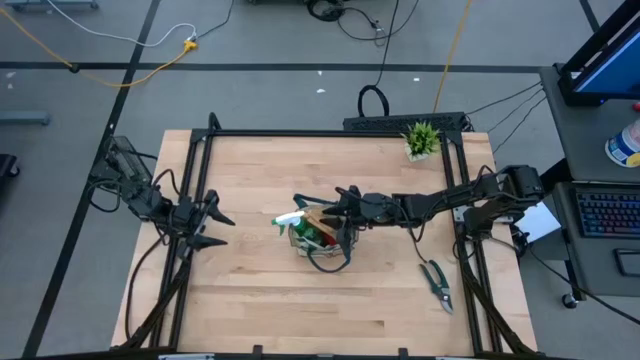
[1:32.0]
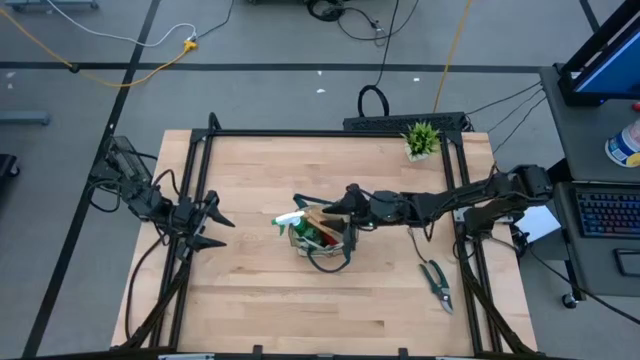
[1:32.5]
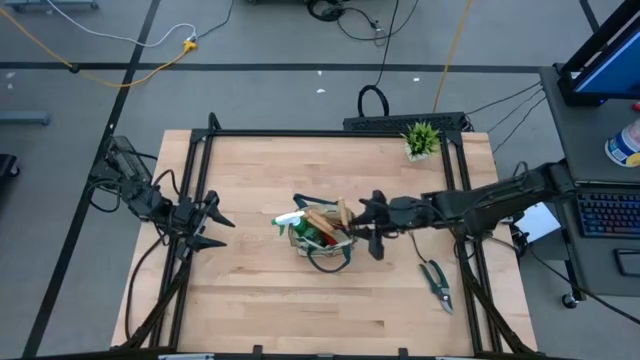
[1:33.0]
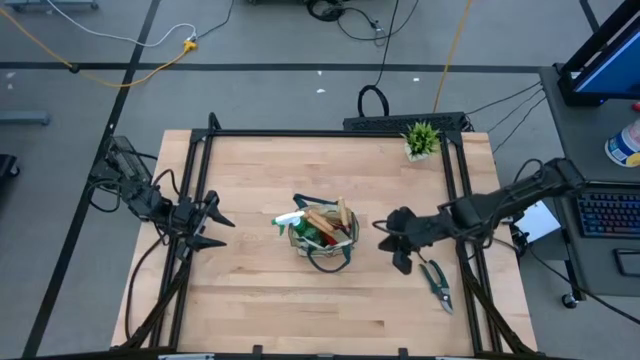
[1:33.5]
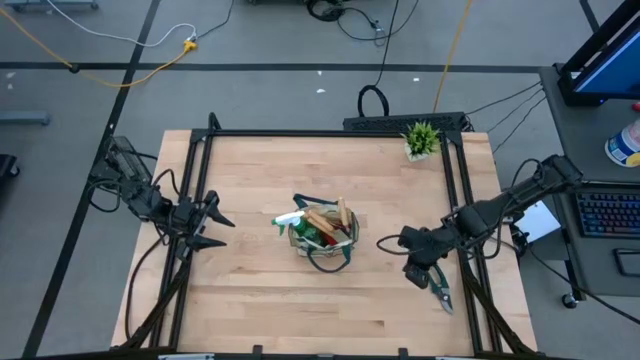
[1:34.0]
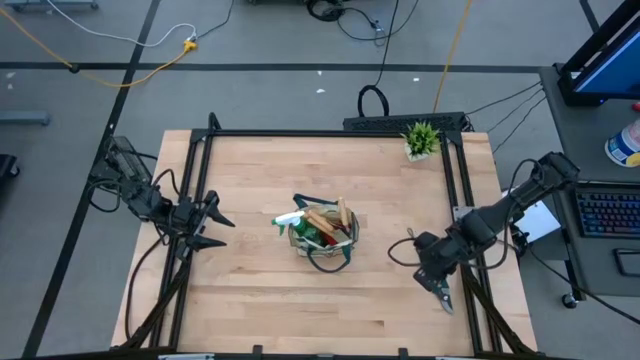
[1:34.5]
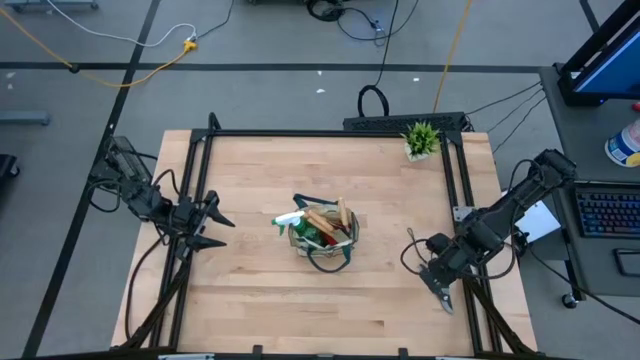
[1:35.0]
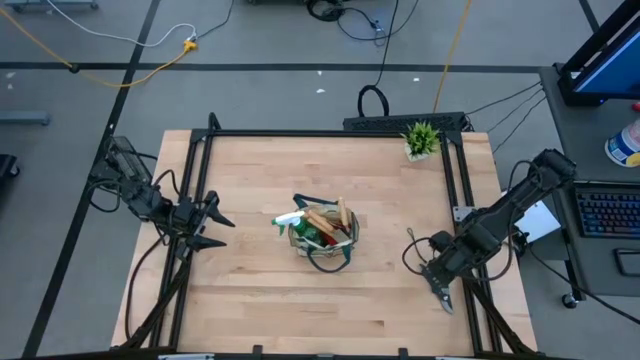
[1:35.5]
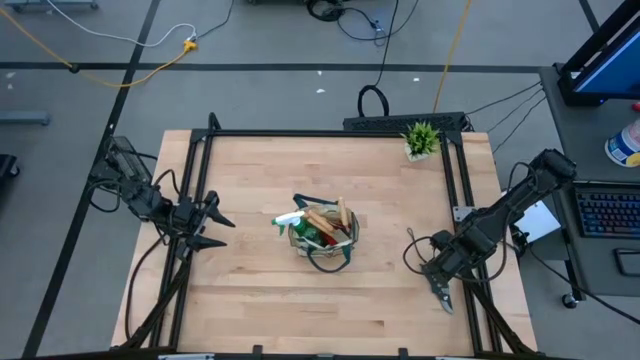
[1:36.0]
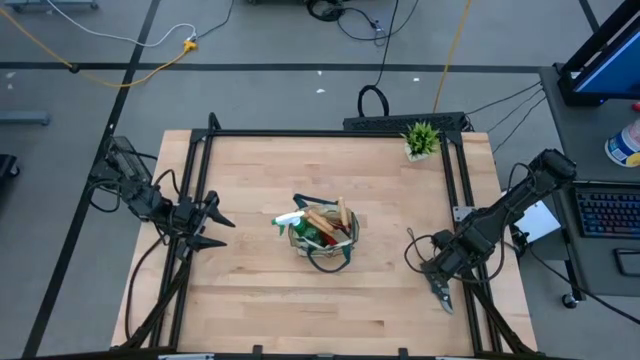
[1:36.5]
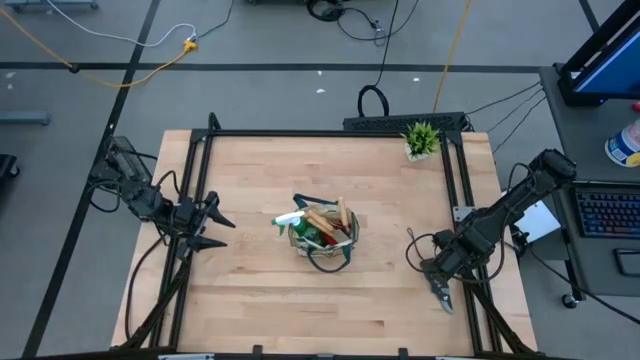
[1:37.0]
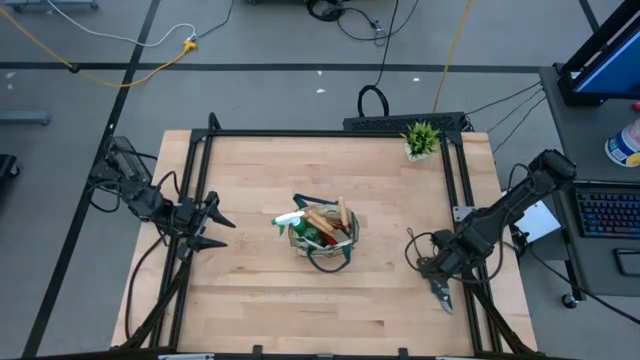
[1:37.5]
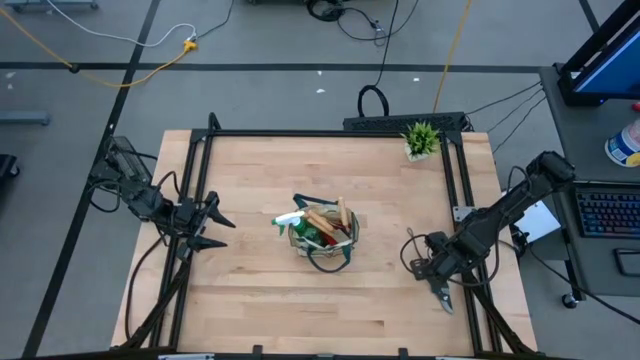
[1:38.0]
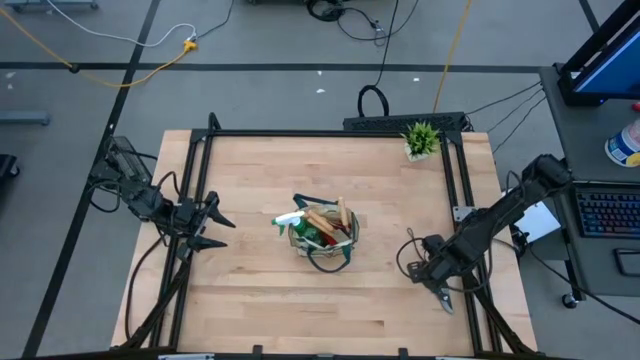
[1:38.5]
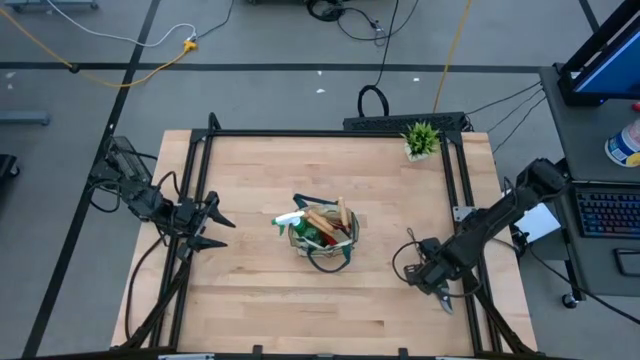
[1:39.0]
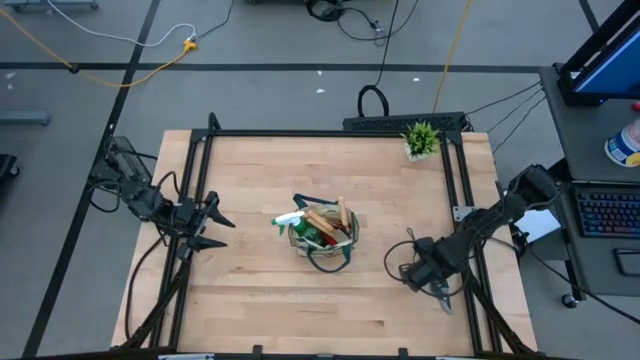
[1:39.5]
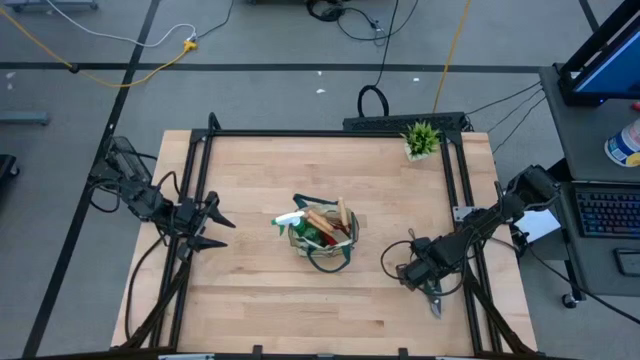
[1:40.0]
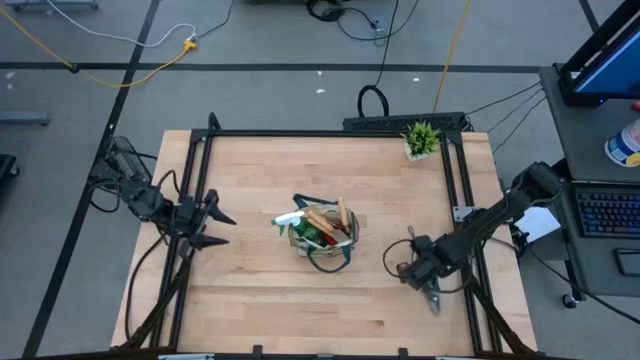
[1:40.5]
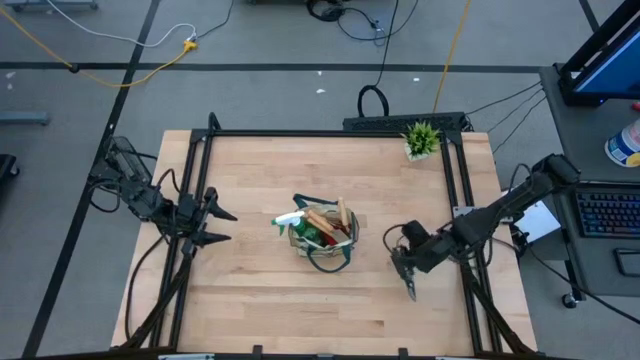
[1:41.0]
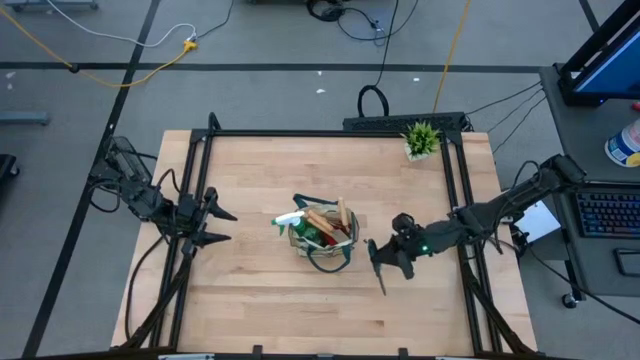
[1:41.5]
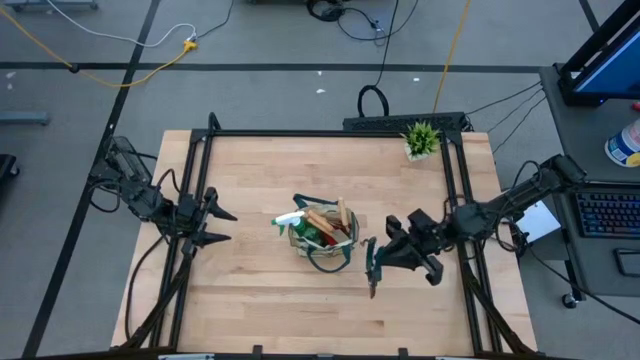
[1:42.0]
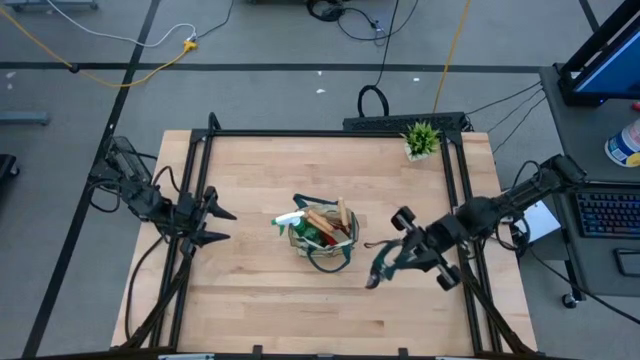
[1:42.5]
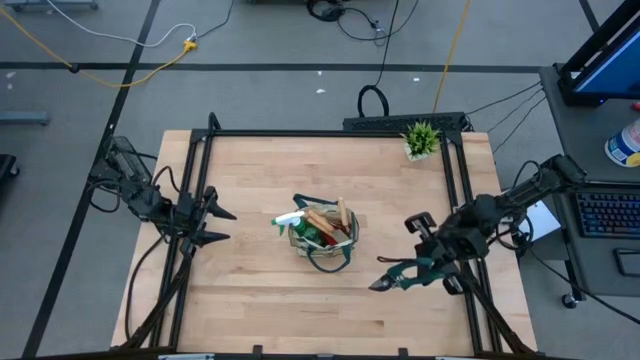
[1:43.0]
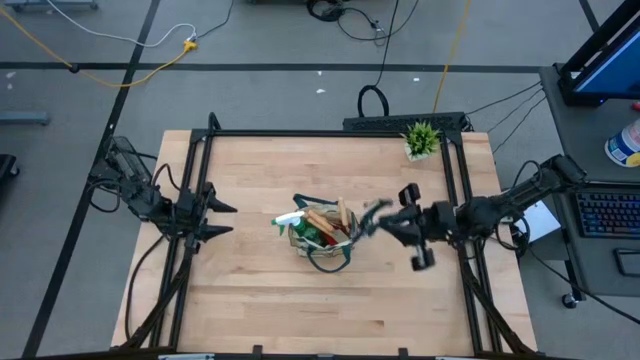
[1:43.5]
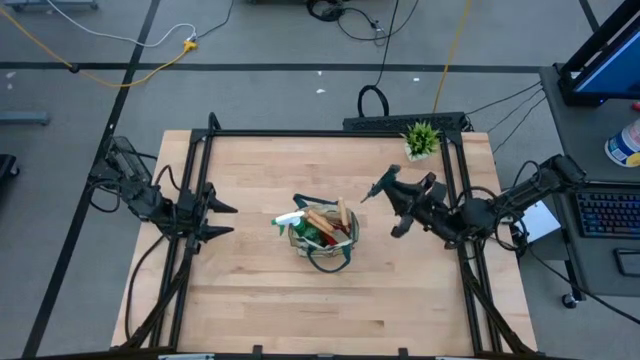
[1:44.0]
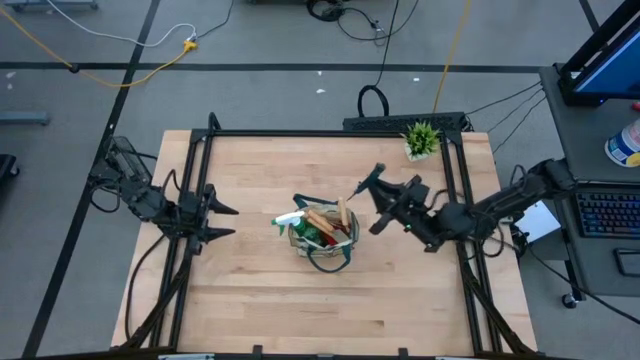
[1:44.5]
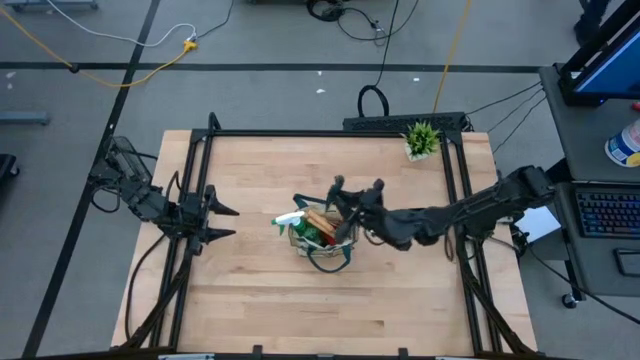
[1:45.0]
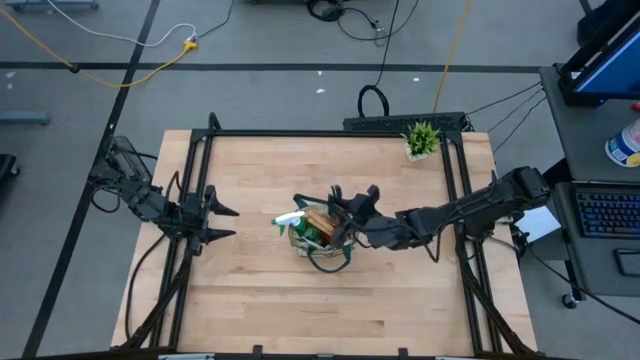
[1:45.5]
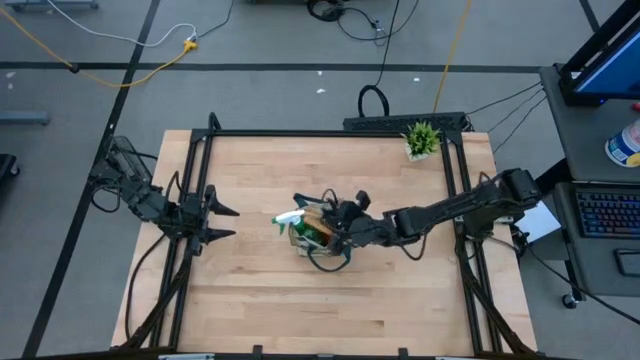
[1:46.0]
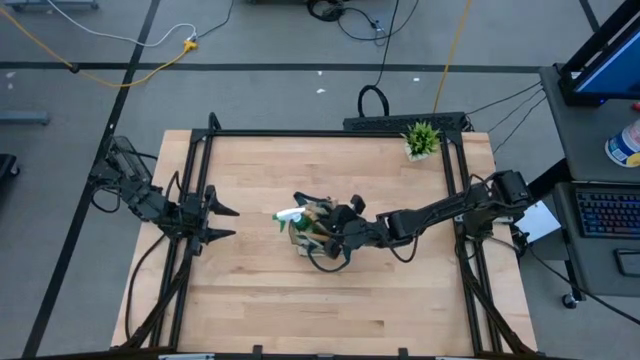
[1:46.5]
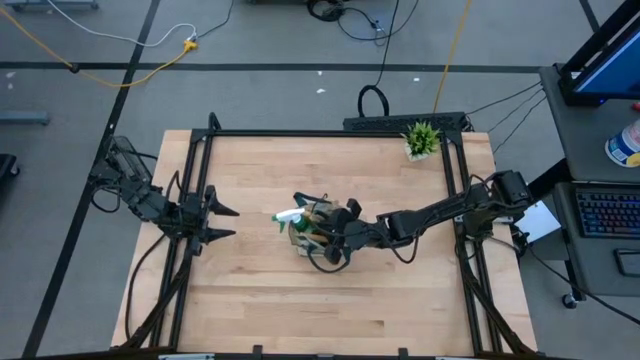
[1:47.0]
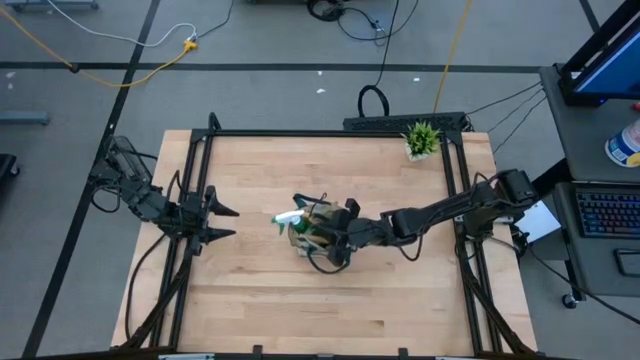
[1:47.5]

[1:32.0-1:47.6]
Task: Pick & Place Garden tools in Gardening bag
Put the green shear scissors into the gardening bag

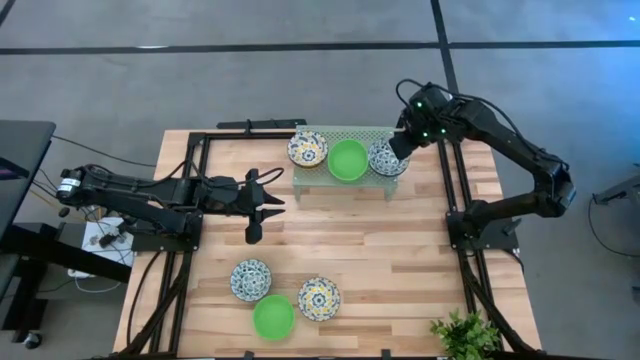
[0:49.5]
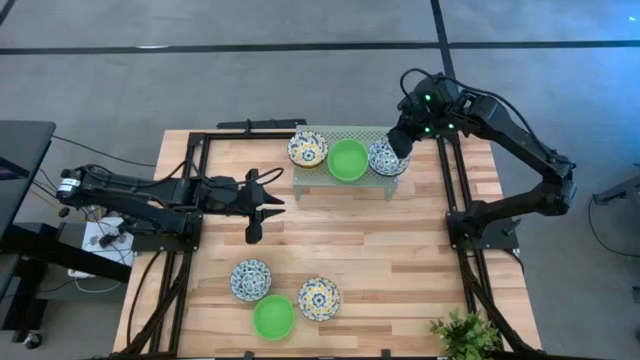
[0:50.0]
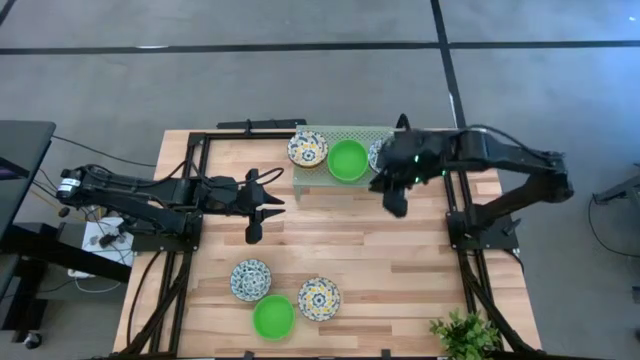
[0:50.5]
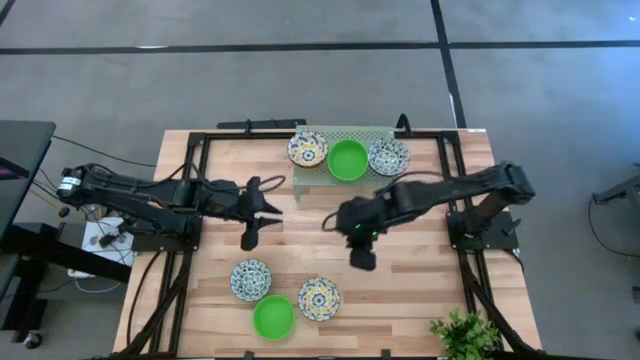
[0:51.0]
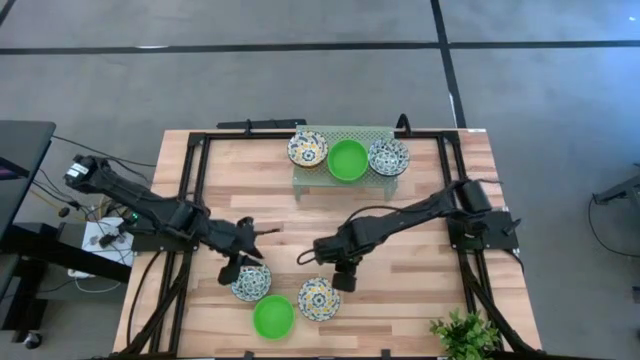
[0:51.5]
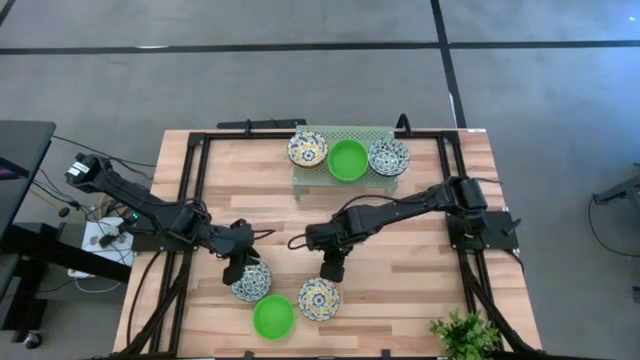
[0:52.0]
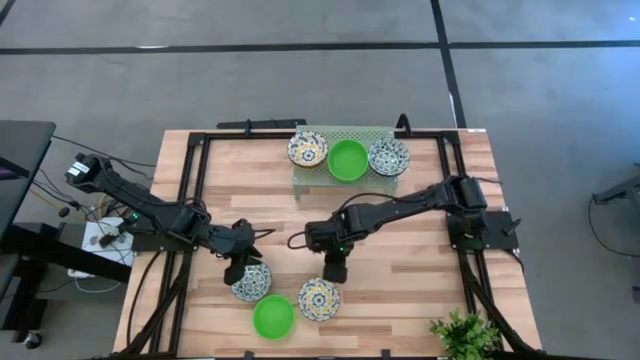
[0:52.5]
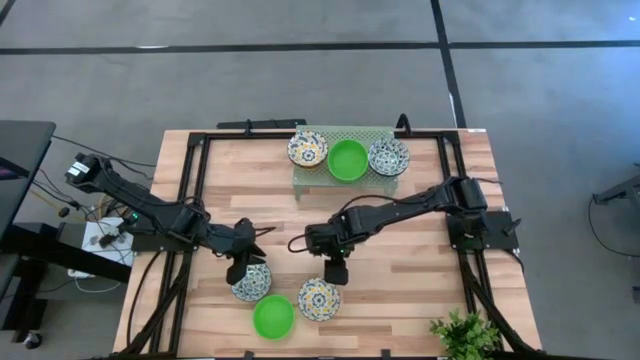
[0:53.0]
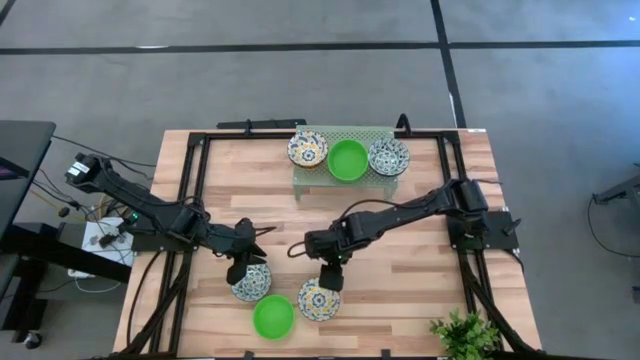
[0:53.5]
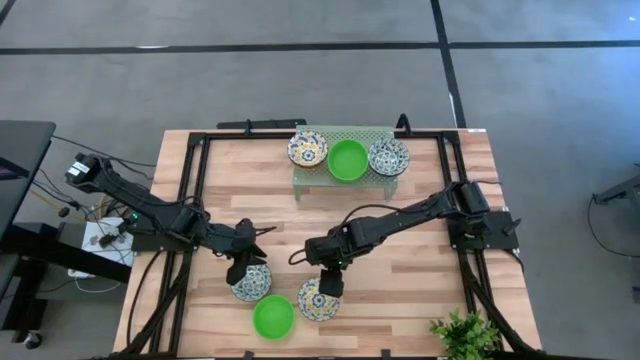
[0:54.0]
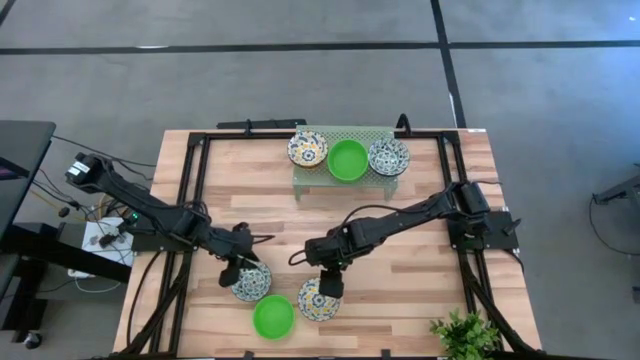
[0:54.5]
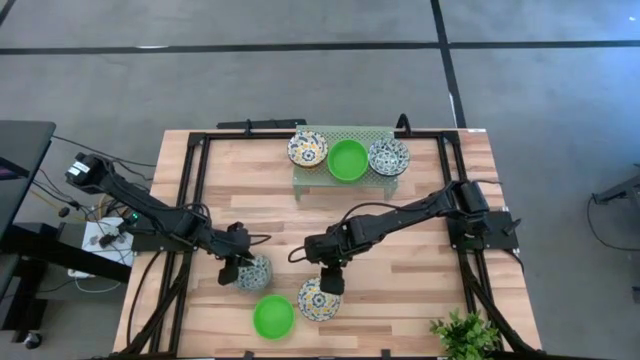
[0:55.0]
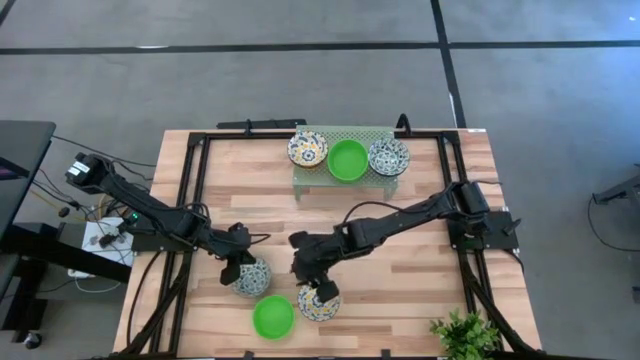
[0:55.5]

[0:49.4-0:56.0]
Task: Pick & Place Mini bowls
Stack the light blue bowl on the light blue bowl on the shelf
